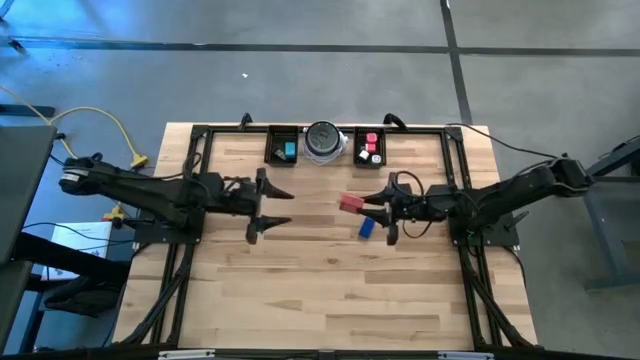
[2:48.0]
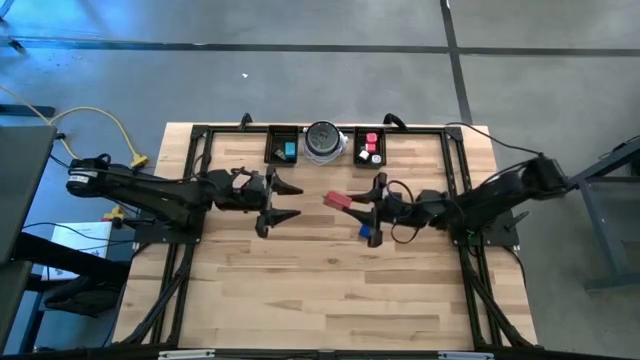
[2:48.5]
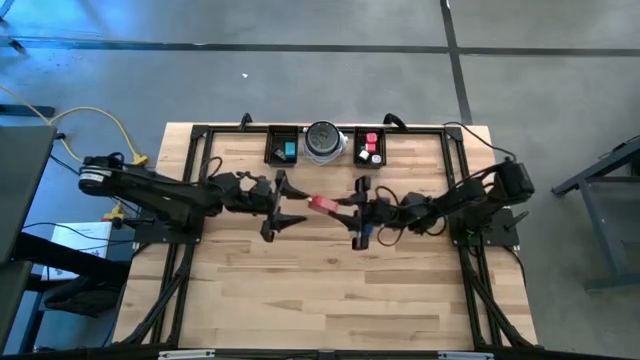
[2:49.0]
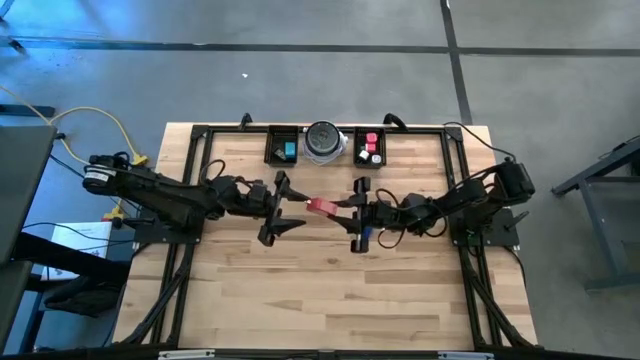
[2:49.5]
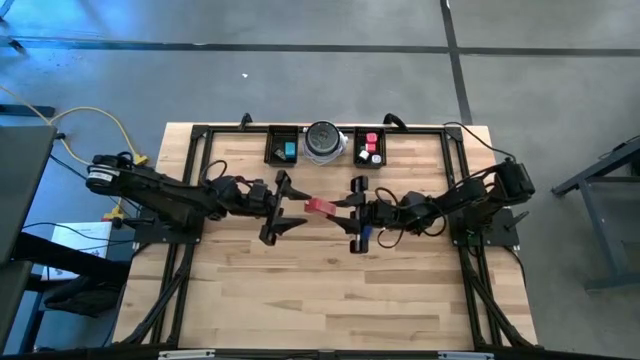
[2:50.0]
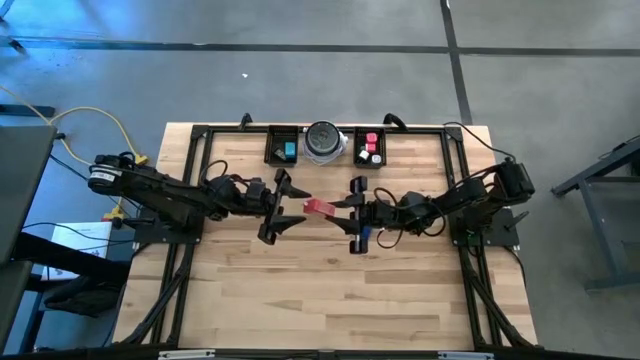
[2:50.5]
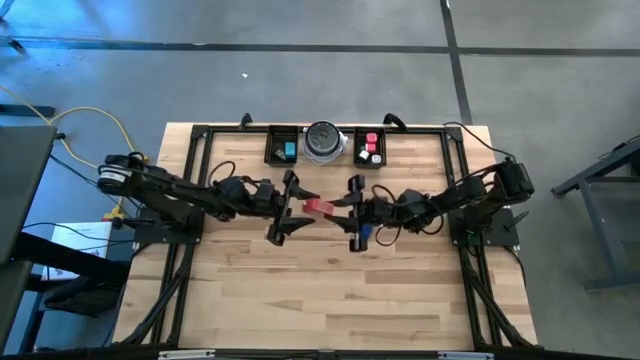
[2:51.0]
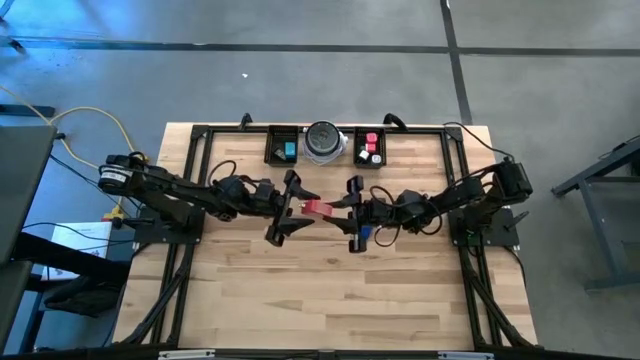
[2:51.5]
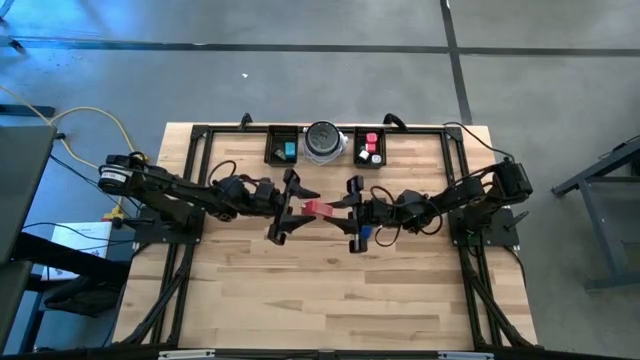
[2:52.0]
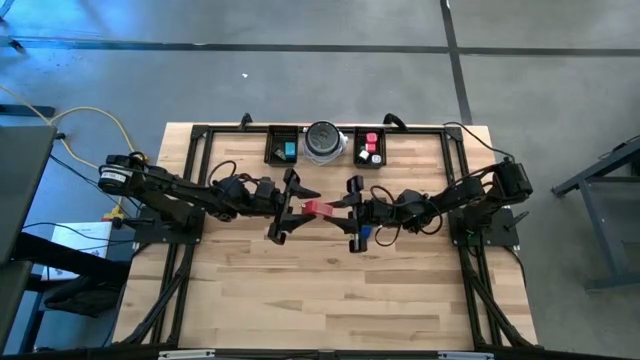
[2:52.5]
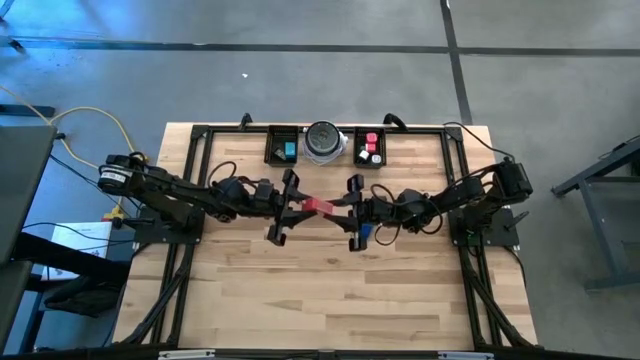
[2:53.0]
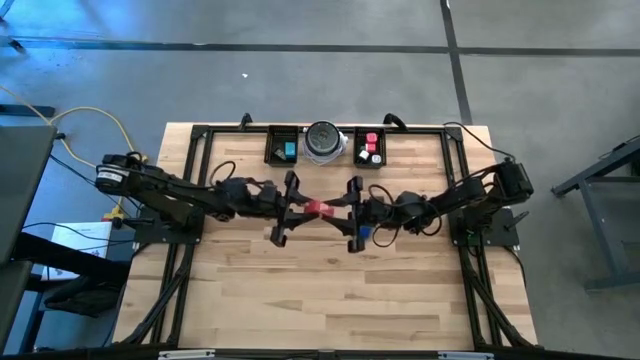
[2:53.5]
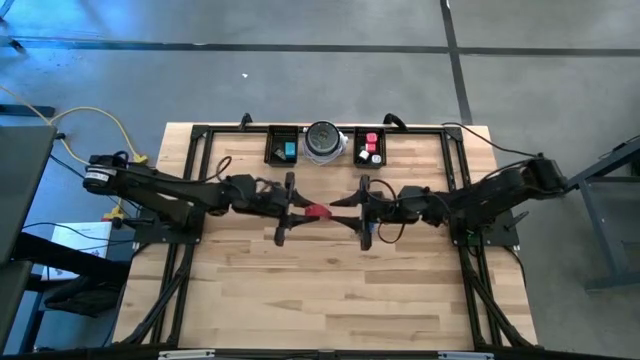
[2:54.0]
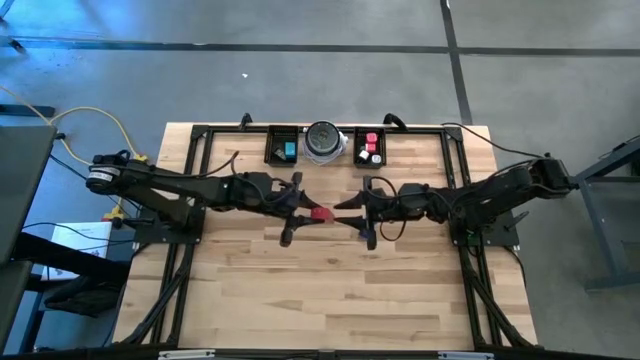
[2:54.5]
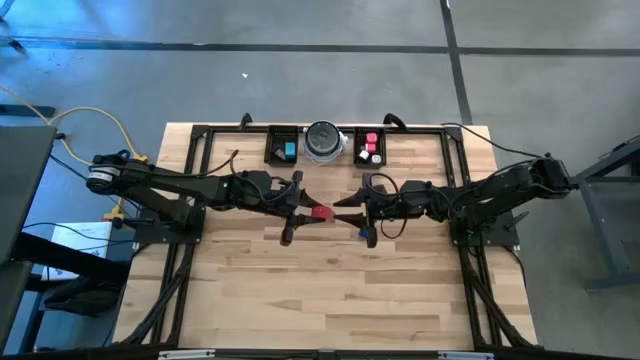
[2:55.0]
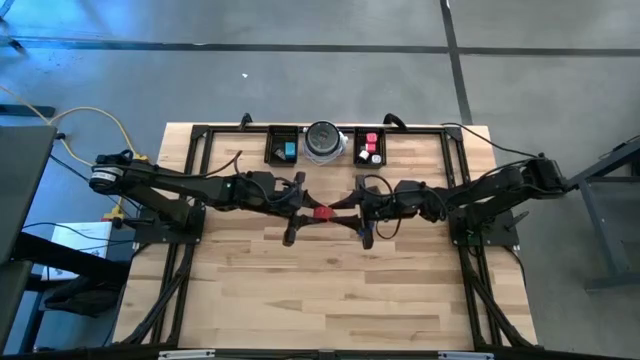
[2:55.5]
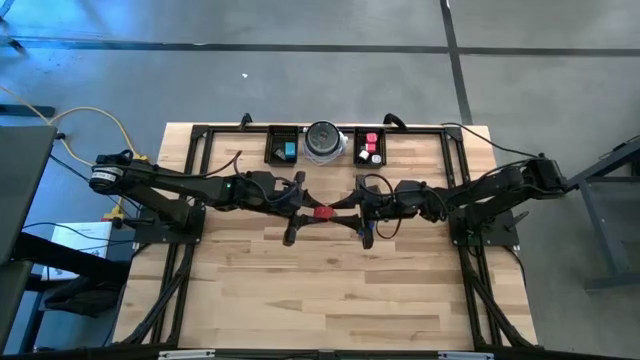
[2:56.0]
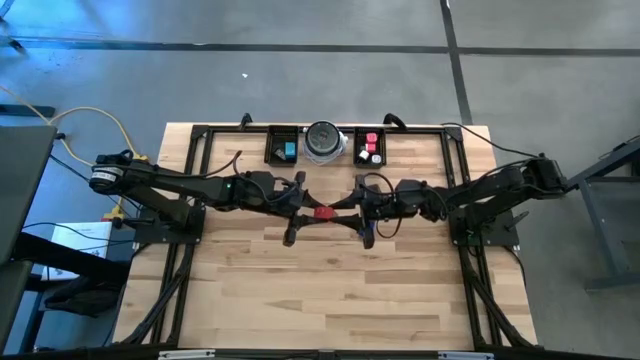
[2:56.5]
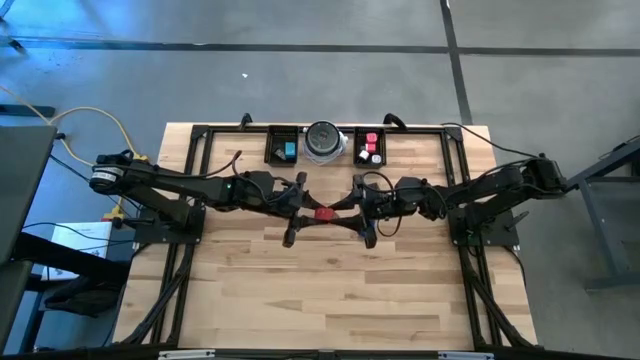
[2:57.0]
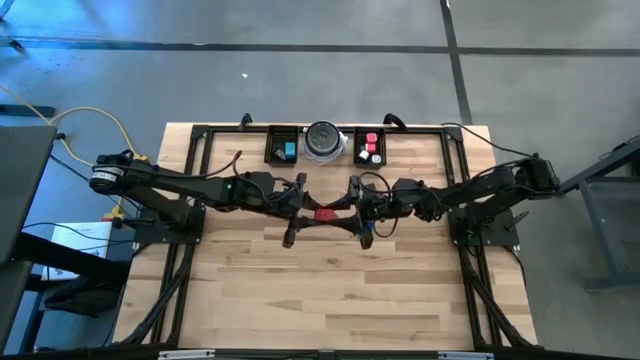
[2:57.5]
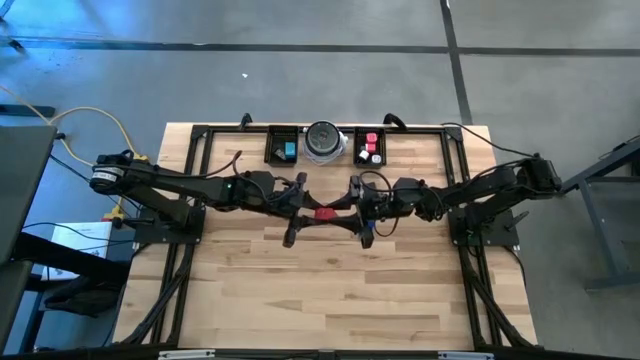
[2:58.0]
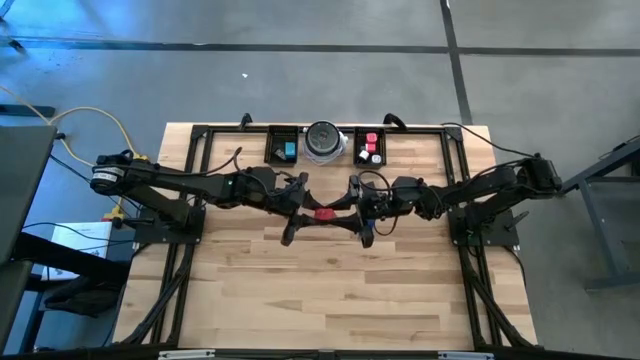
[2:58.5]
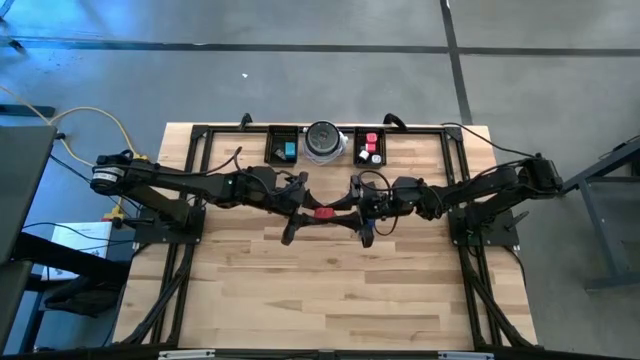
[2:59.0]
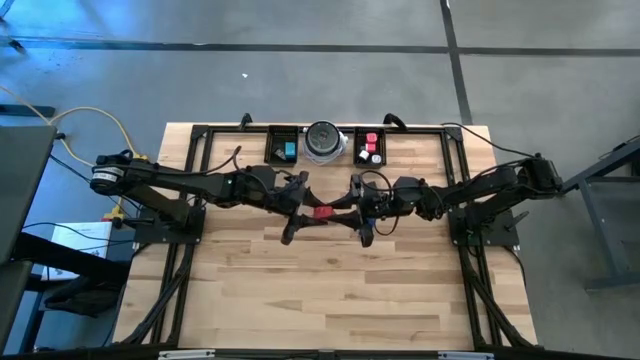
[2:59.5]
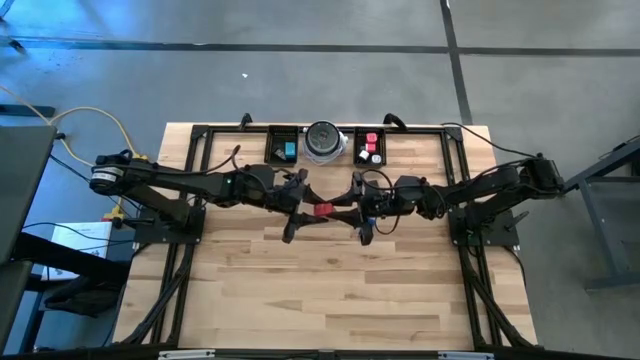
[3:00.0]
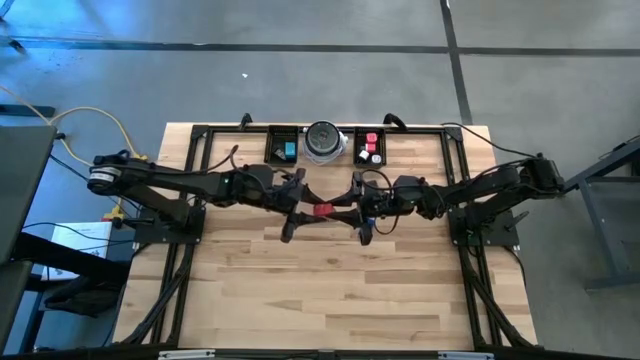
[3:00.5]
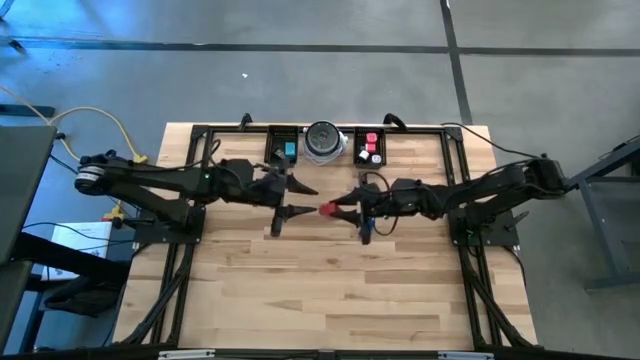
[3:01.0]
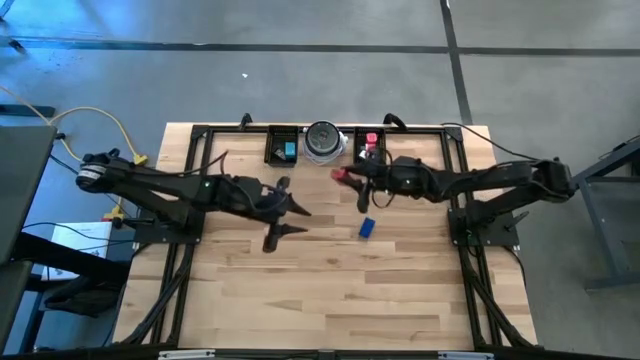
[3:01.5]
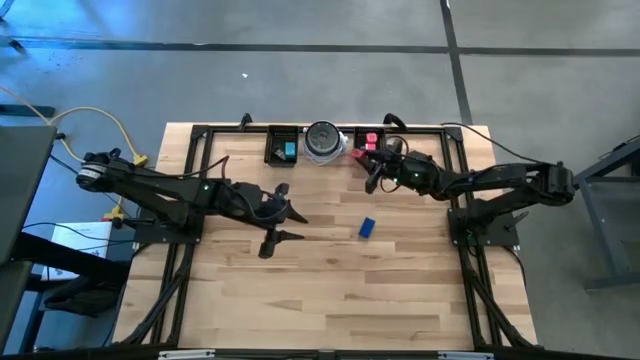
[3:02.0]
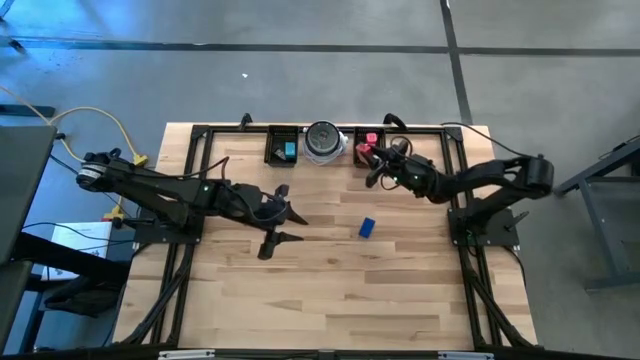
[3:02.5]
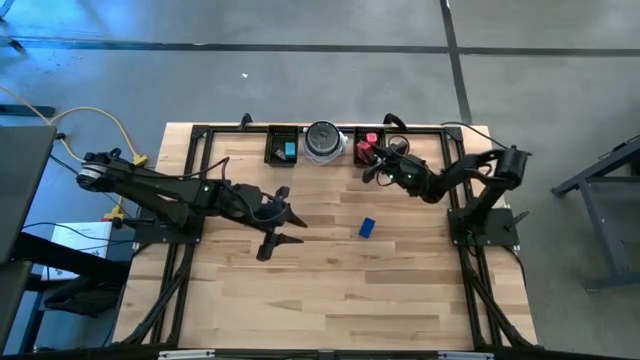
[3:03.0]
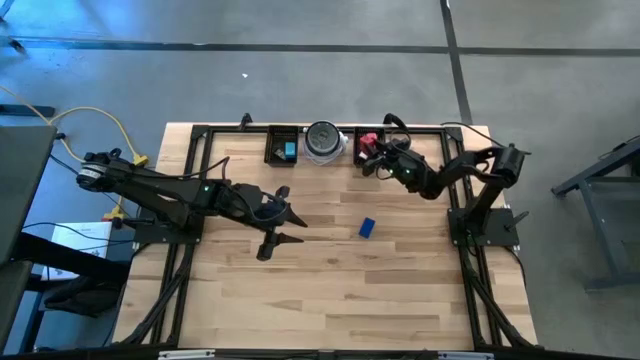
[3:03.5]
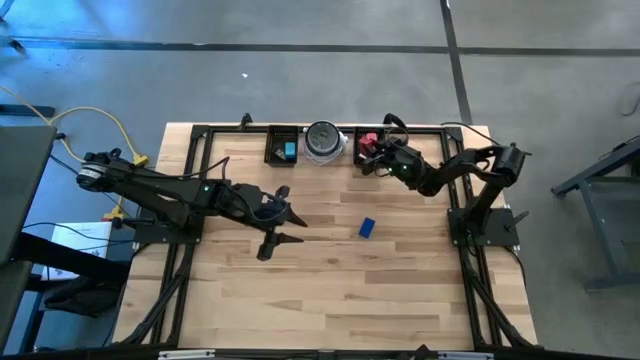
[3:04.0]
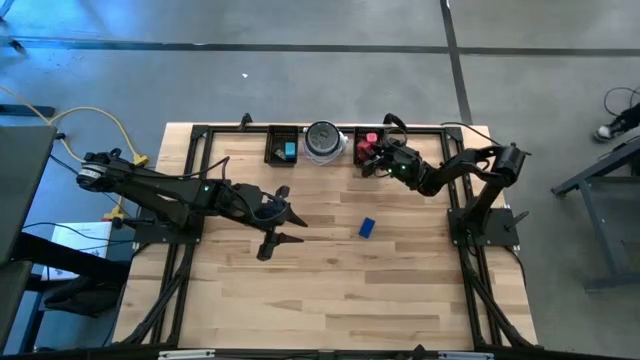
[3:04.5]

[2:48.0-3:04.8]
Task: Pick & Place Office items
Put the red charger adapter into the right black basket

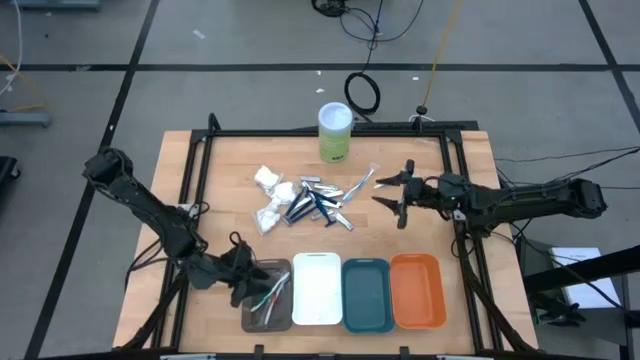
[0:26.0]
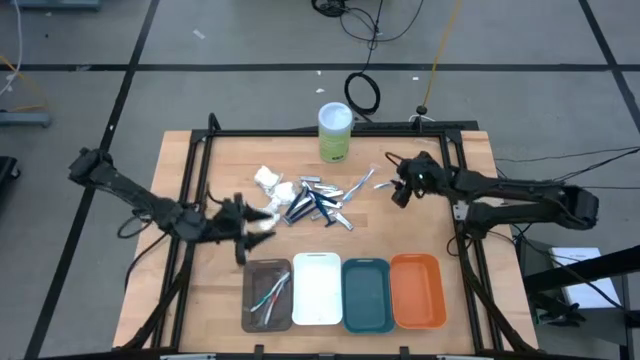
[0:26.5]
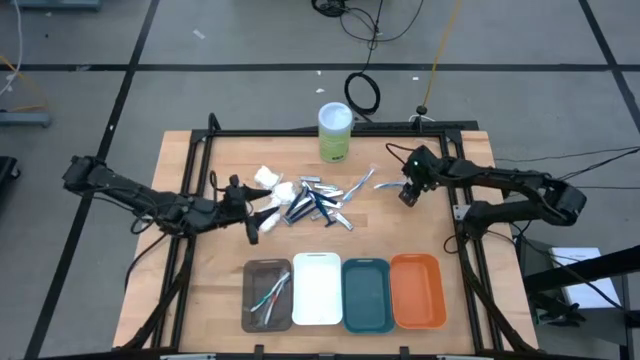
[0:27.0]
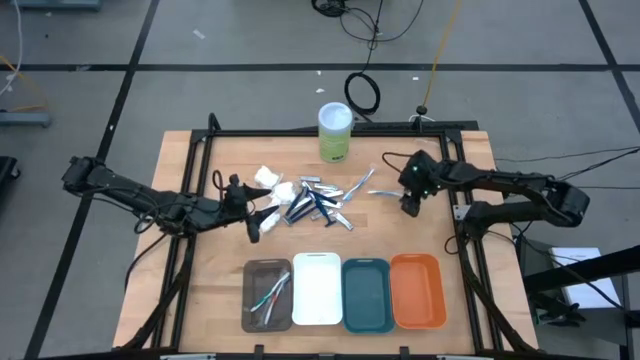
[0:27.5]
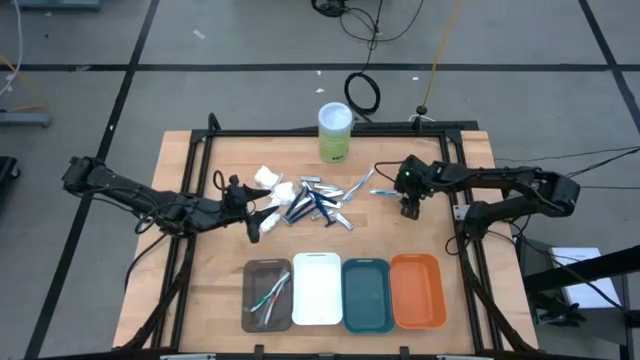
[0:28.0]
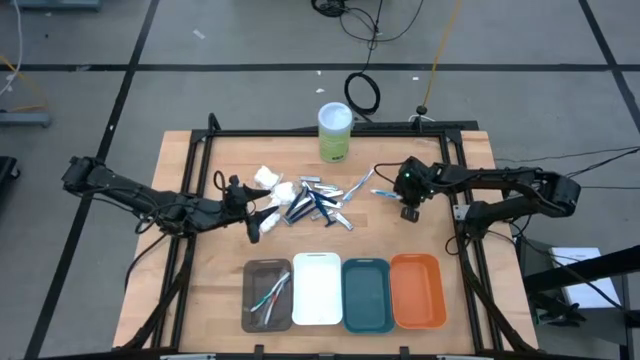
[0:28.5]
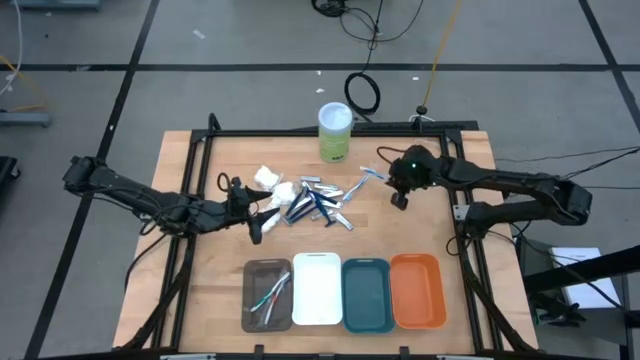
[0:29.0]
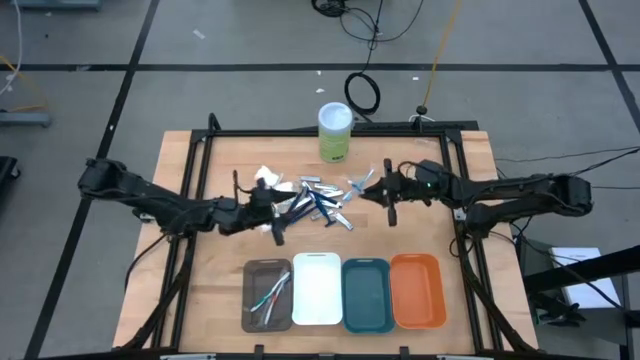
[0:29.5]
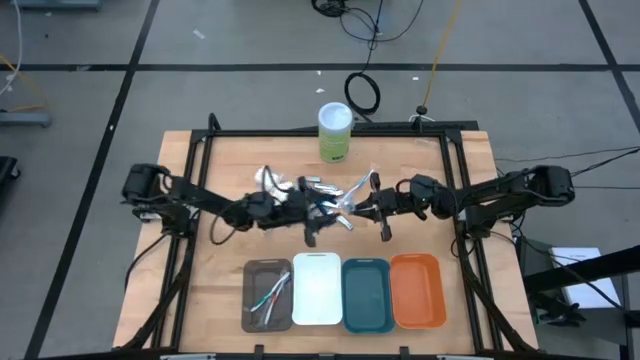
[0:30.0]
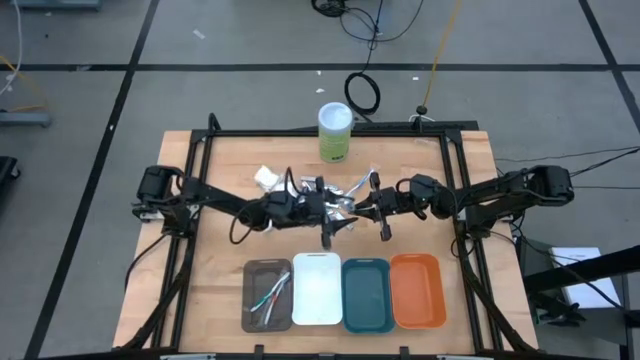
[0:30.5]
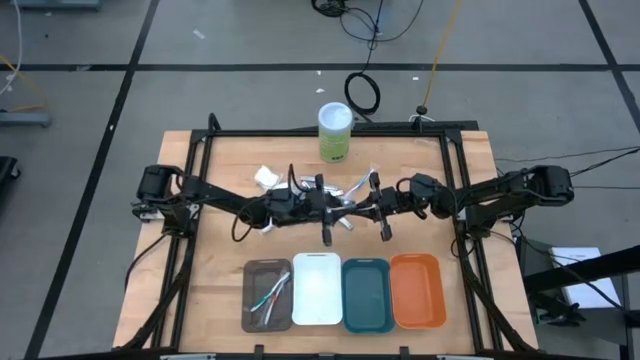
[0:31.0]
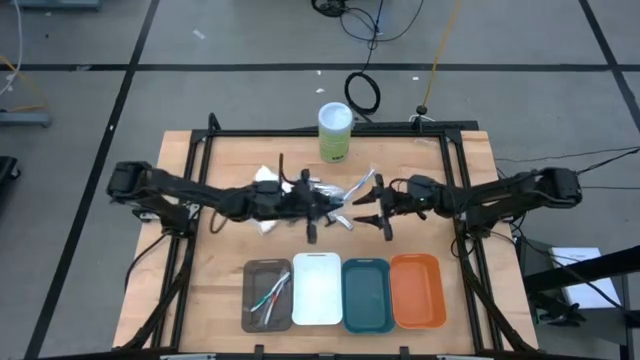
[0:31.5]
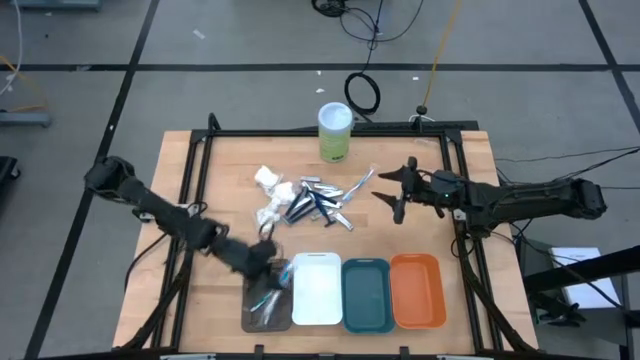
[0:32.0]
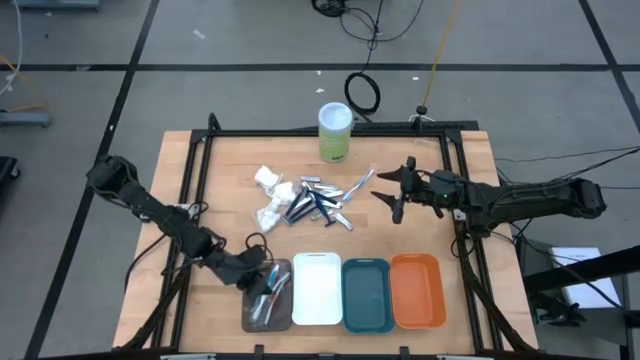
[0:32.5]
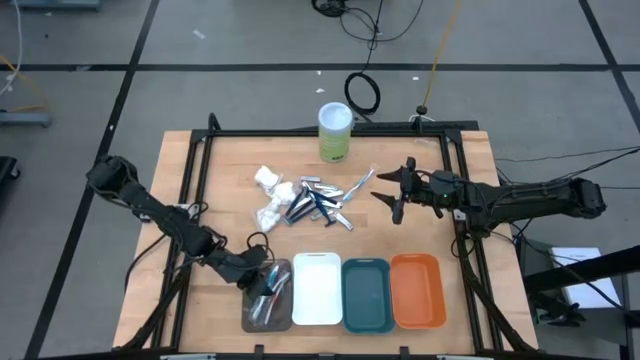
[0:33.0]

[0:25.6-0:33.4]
Task: Pick & Place Travel size toiletries
Put the blue toothbrush into the black bin
